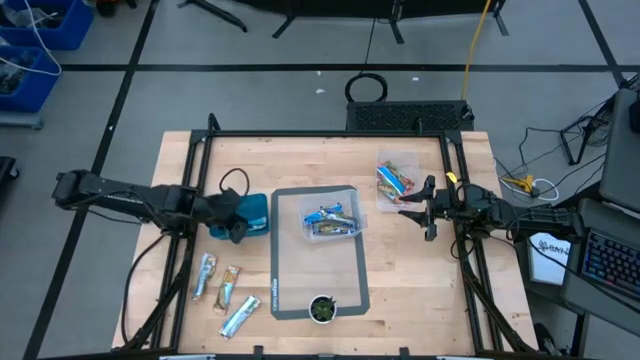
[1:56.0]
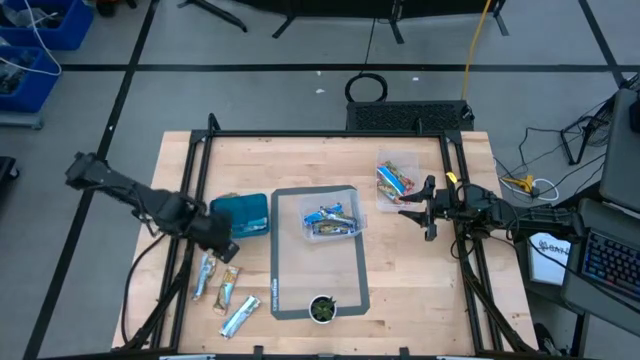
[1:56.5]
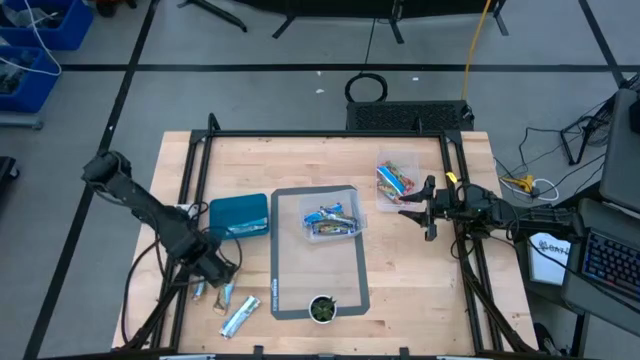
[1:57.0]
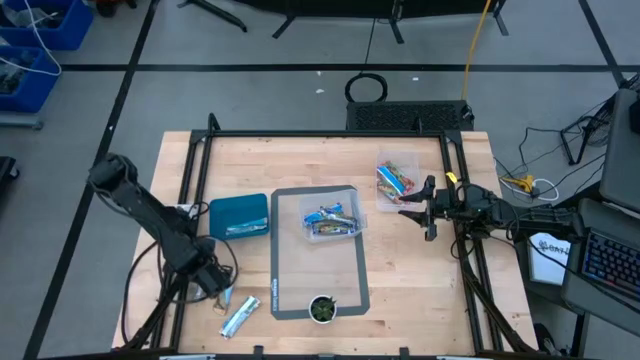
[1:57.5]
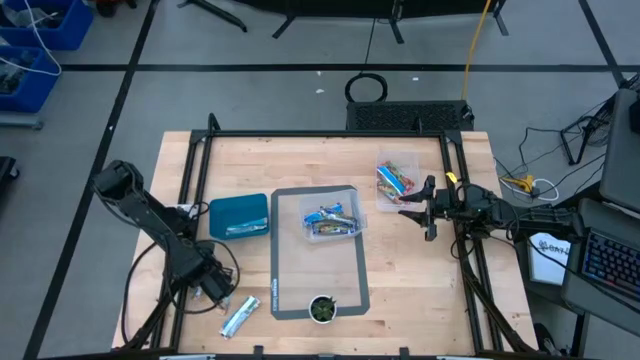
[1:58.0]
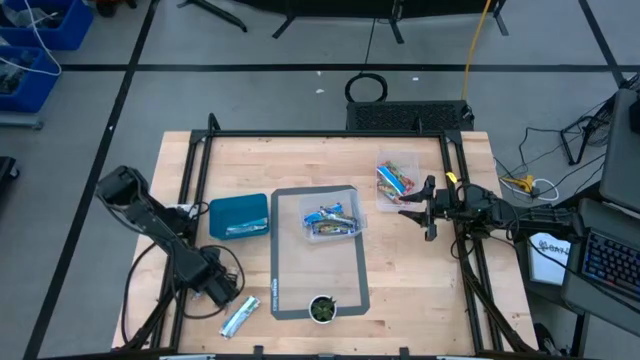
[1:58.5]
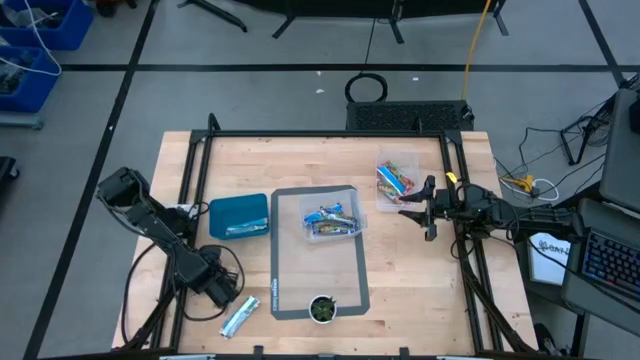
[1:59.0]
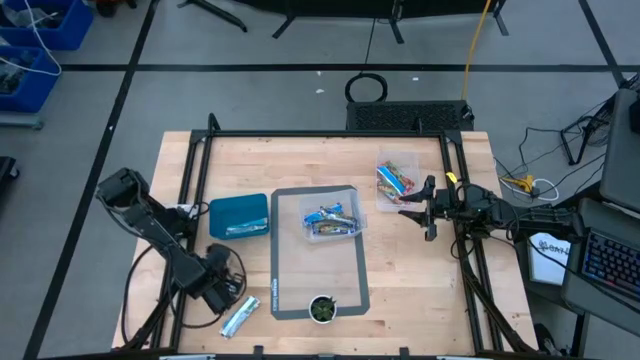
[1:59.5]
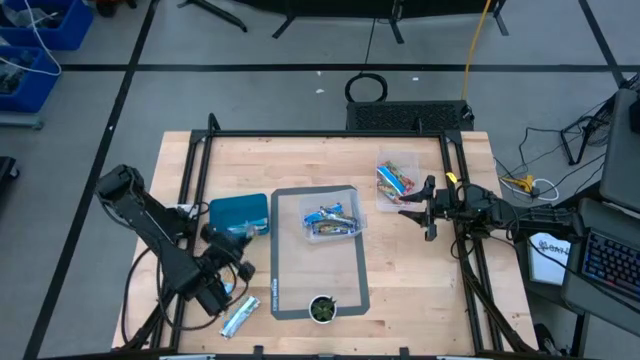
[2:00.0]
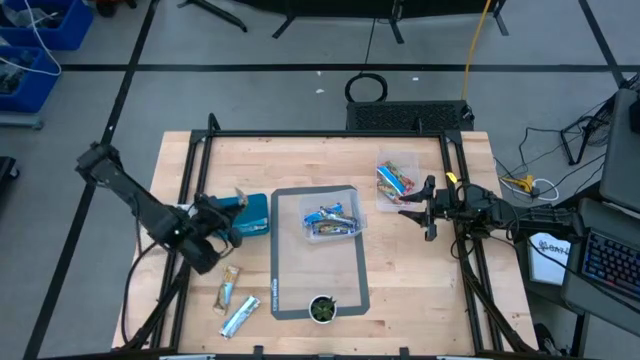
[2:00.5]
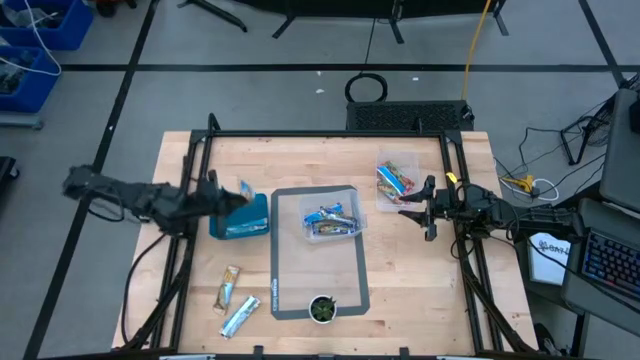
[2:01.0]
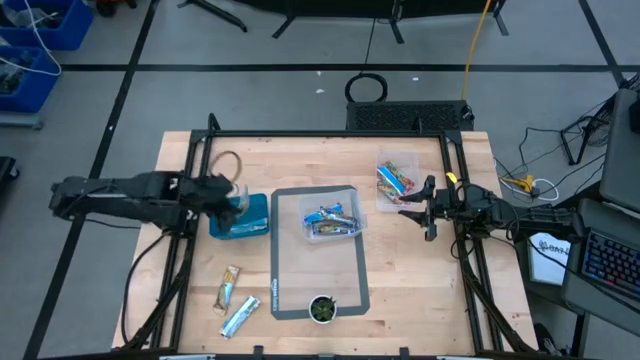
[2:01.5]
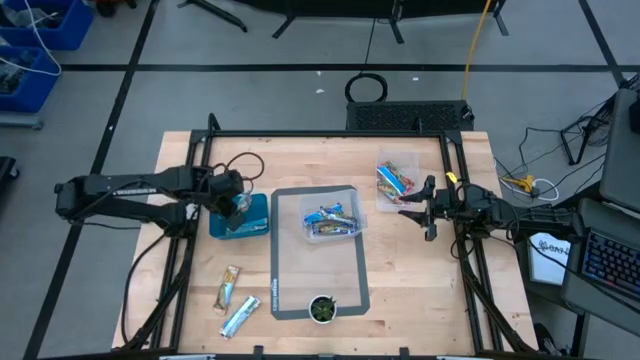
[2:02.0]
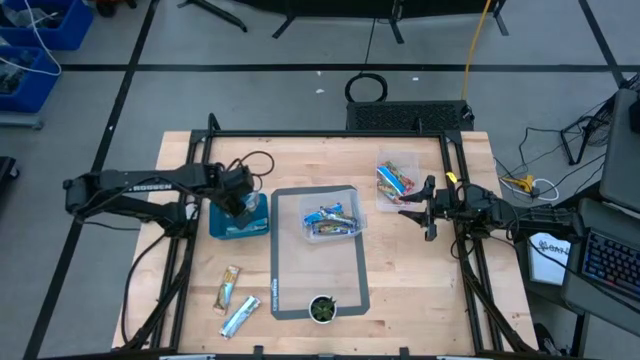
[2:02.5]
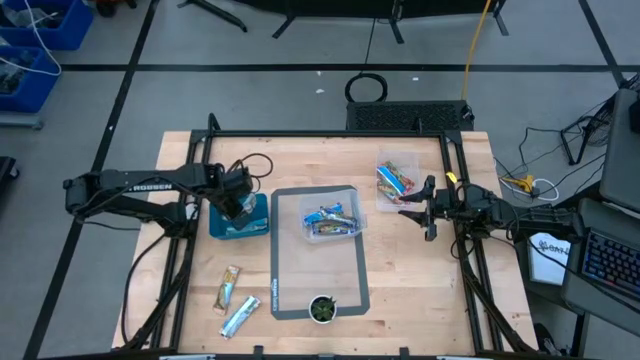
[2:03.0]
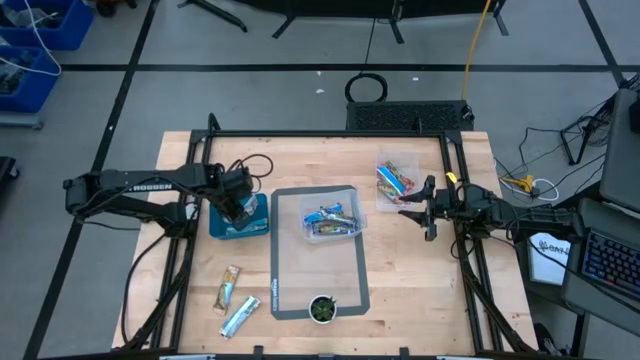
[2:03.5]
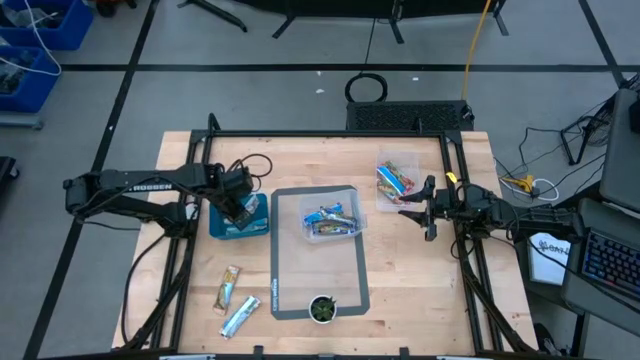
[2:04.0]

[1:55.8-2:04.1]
Task: Pick and place Granola Bars by type
Put the orange granola bar into the blue bin

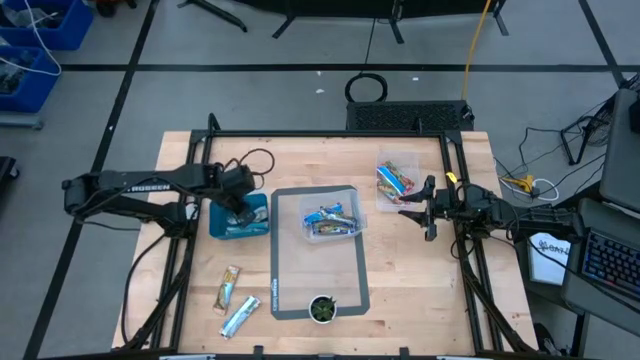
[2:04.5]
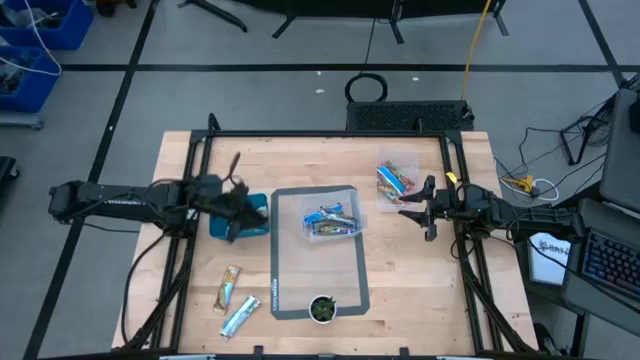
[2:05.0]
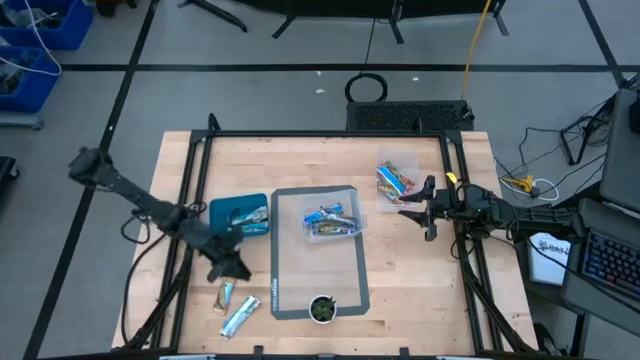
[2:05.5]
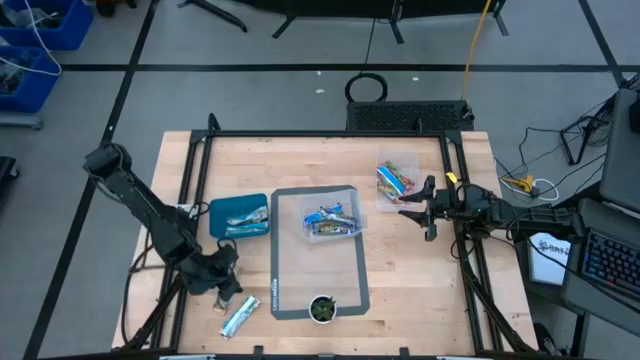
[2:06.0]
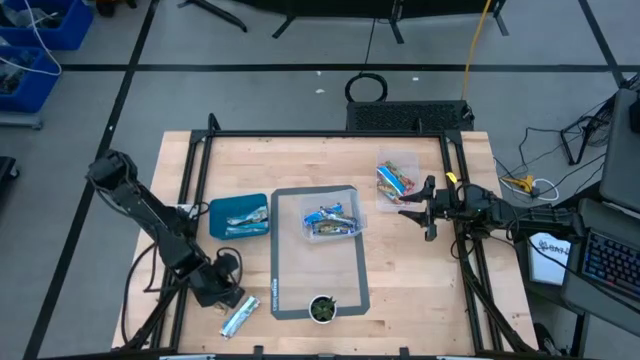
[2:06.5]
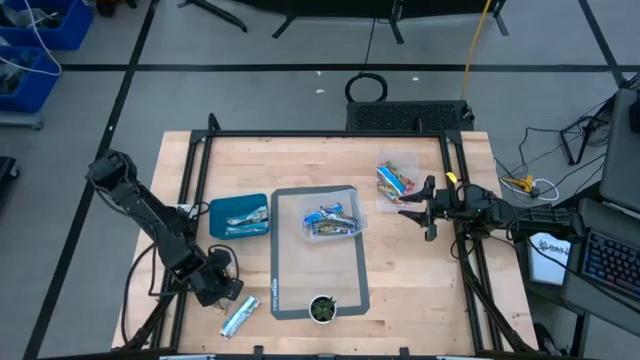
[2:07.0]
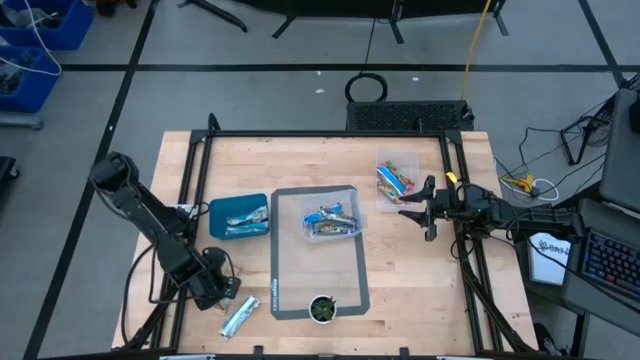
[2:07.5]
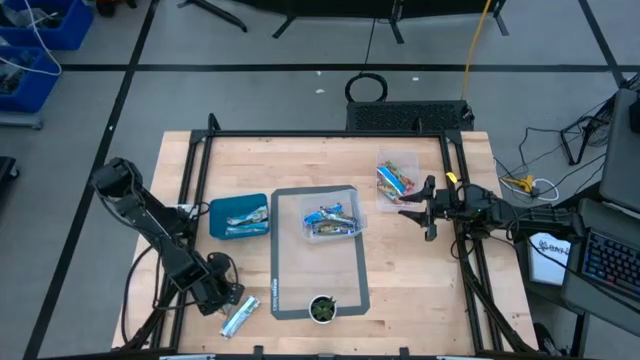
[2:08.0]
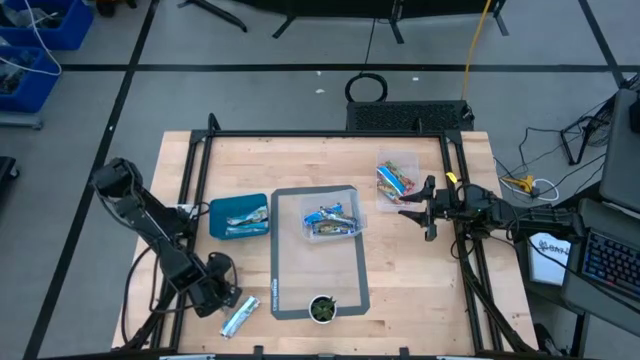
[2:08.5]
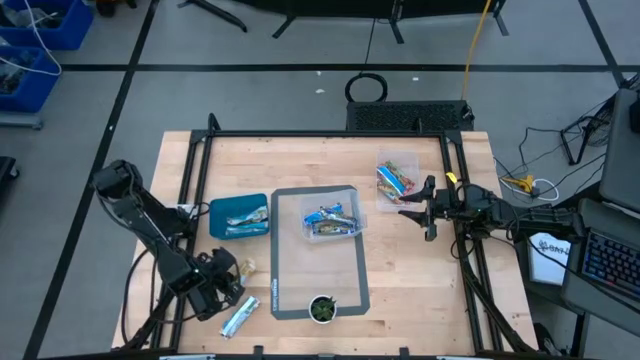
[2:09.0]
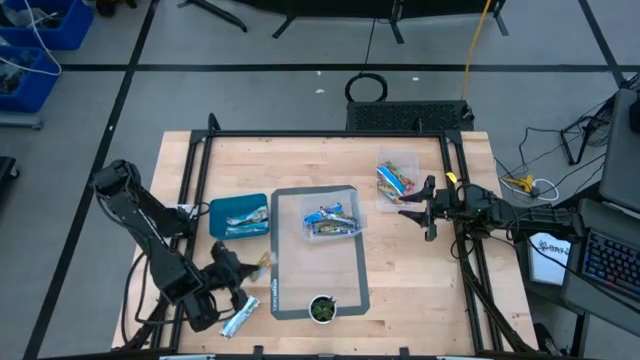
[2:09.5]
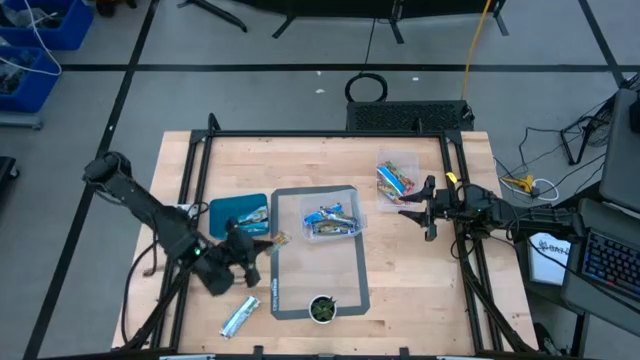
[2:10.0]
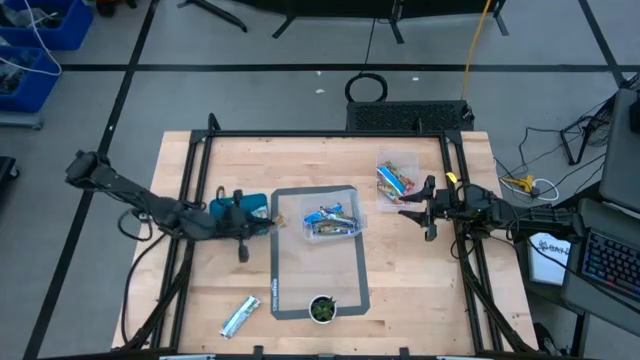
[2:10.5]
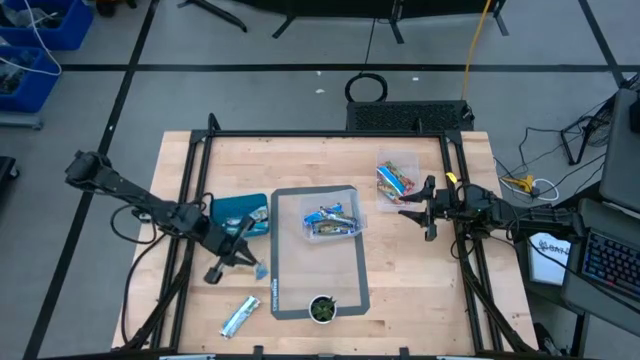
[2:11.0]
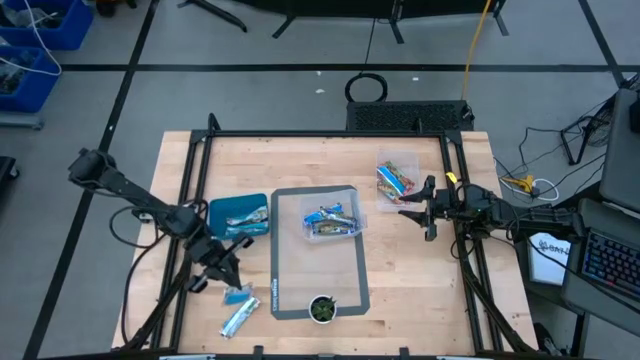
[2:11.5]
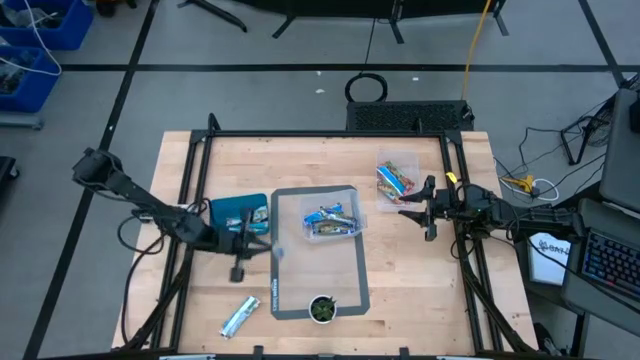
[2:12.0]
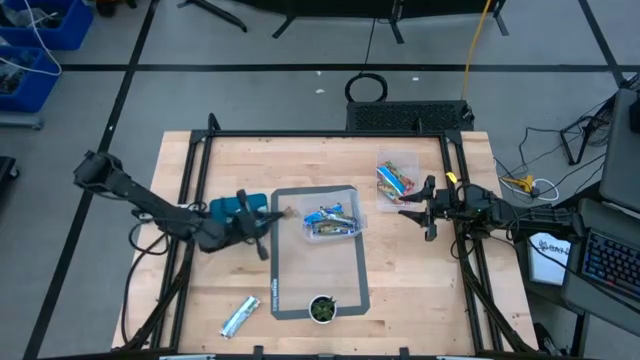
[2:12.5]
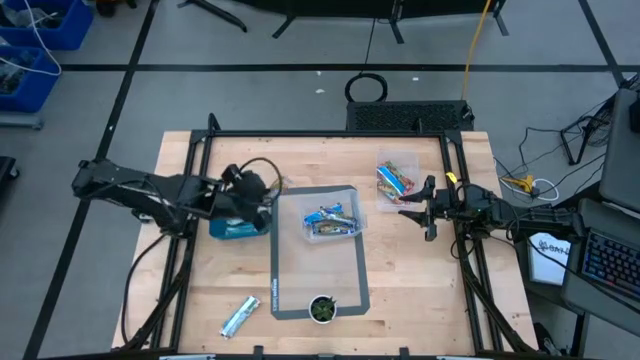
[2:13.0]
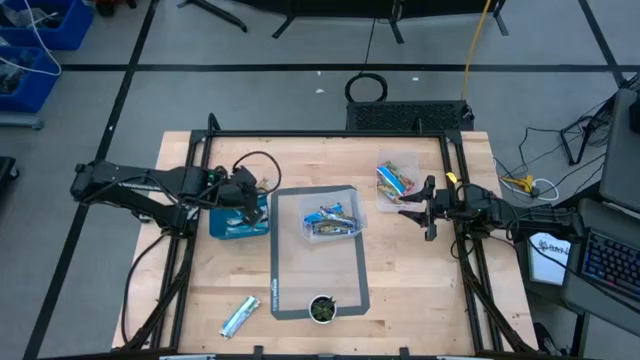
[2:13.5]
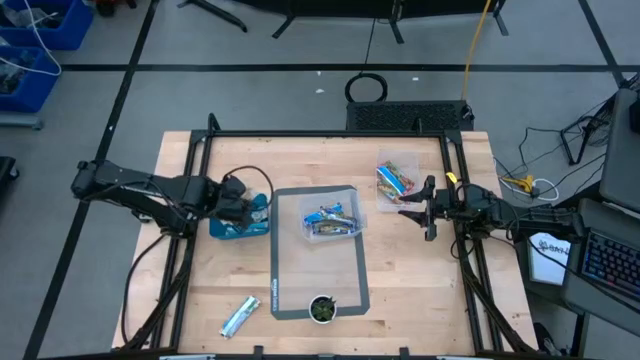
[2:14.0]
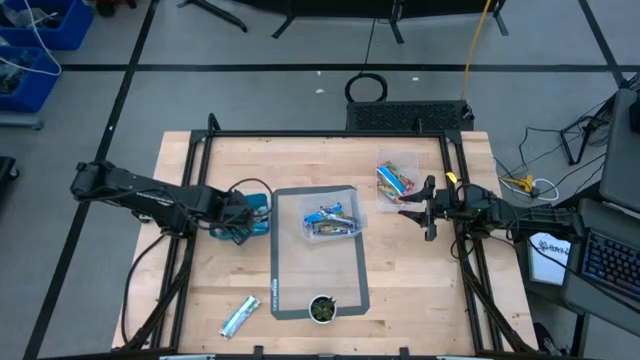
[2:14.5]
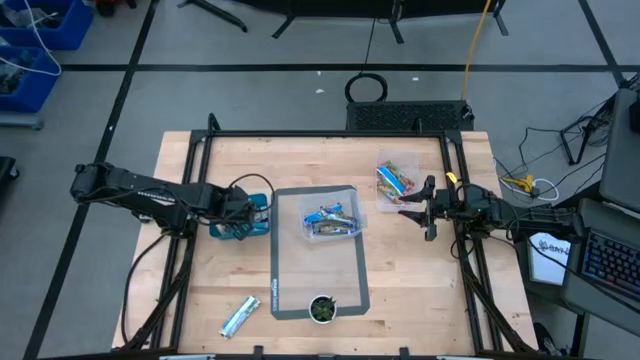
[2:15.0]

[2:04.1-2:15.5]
Put the orange granola bar into the blue bin
